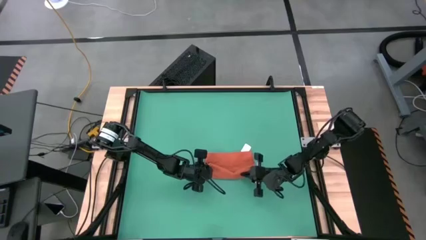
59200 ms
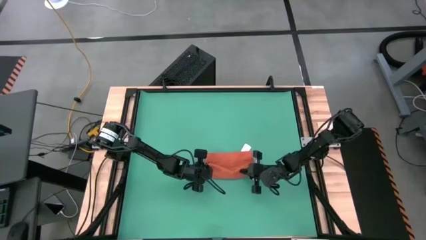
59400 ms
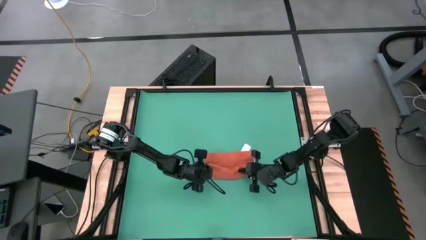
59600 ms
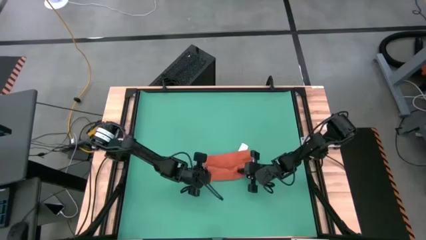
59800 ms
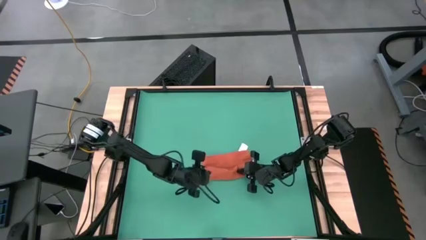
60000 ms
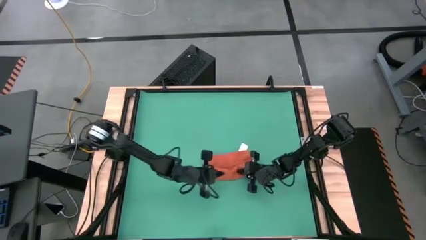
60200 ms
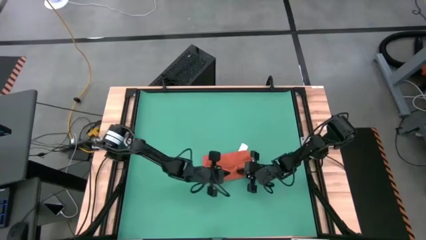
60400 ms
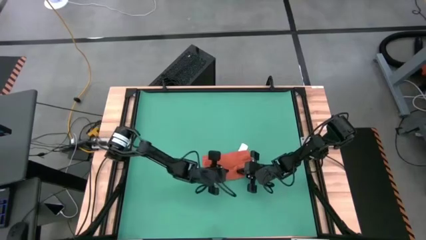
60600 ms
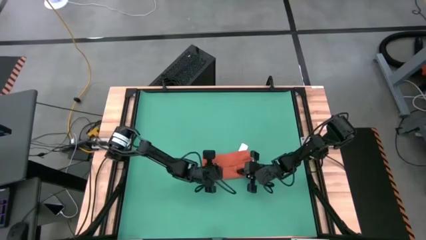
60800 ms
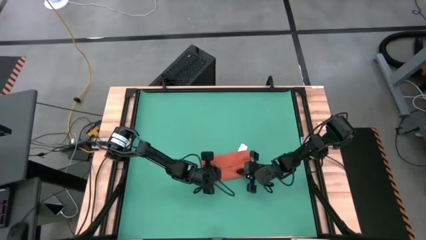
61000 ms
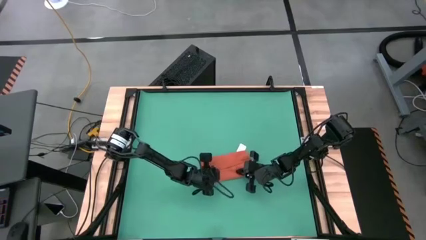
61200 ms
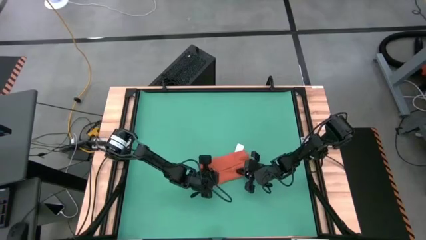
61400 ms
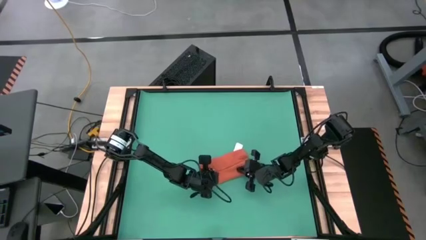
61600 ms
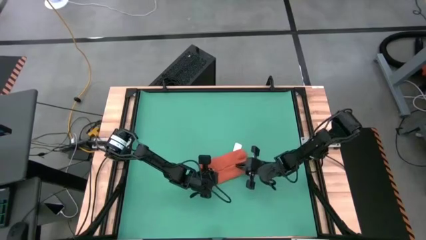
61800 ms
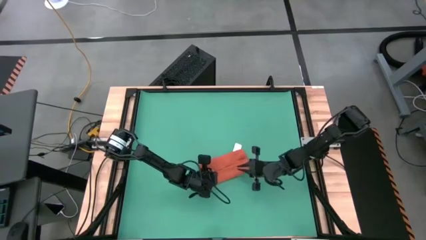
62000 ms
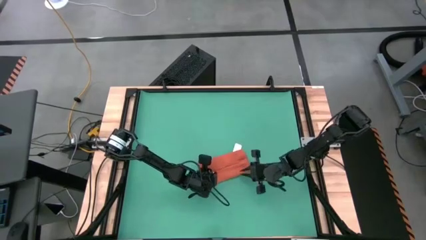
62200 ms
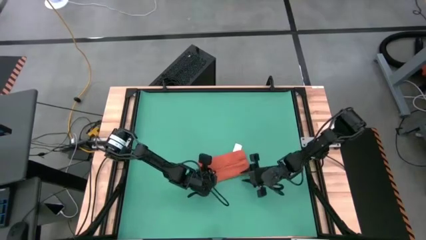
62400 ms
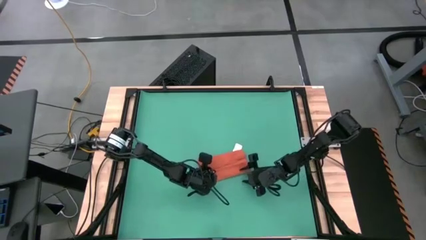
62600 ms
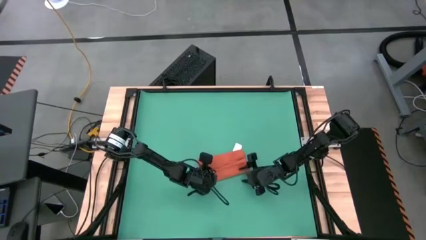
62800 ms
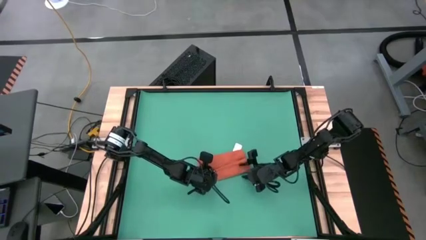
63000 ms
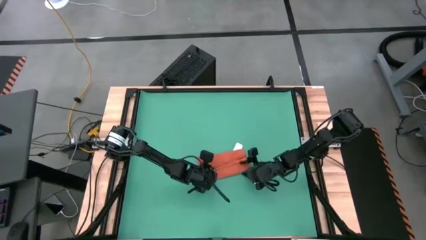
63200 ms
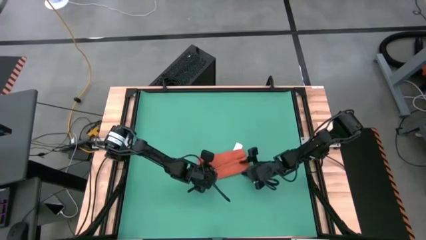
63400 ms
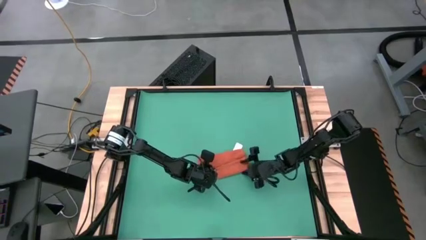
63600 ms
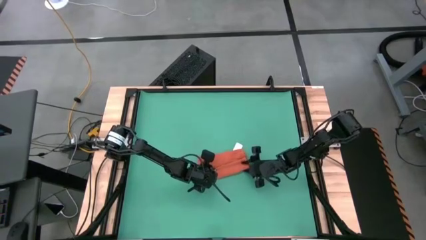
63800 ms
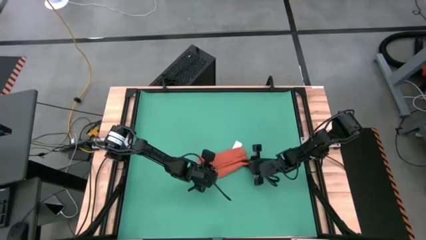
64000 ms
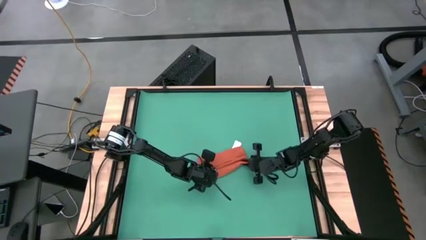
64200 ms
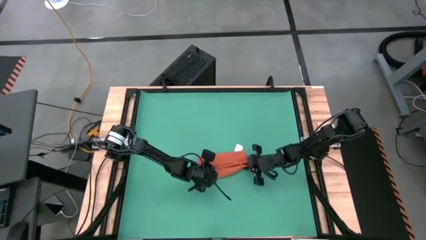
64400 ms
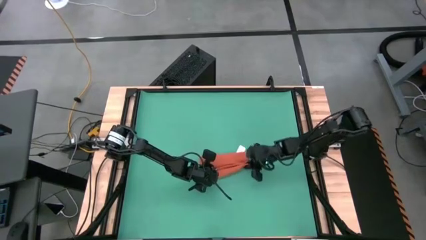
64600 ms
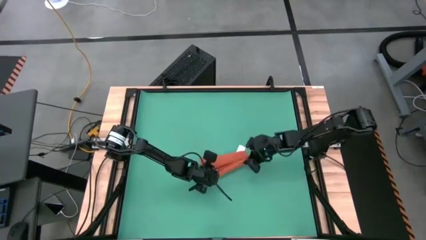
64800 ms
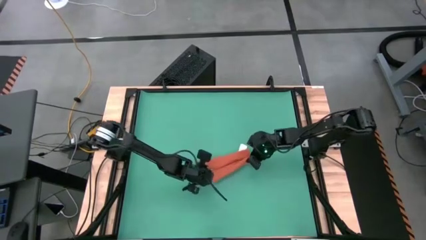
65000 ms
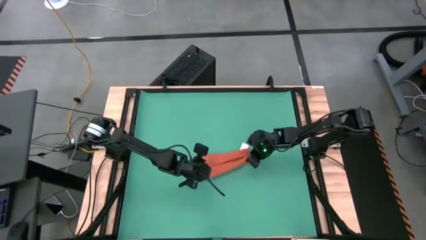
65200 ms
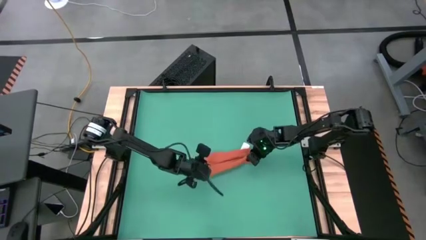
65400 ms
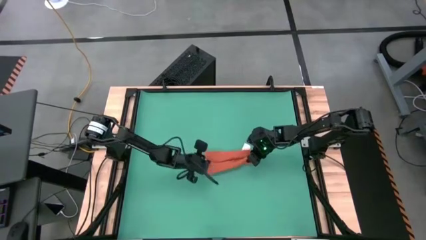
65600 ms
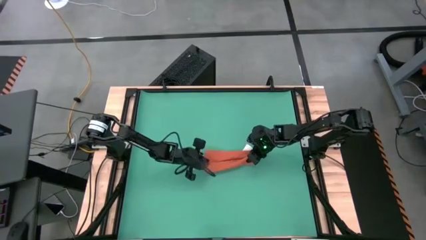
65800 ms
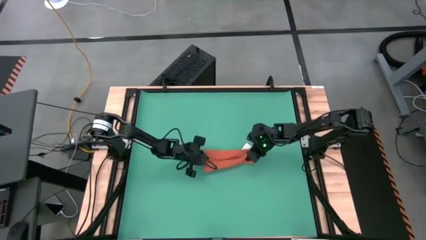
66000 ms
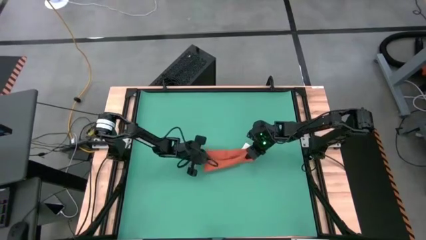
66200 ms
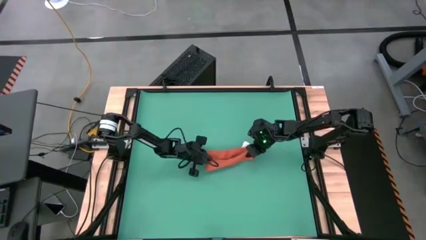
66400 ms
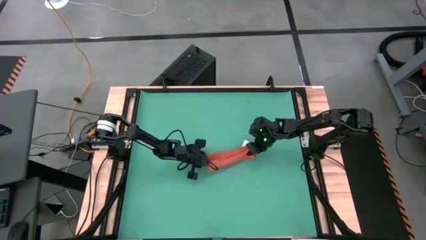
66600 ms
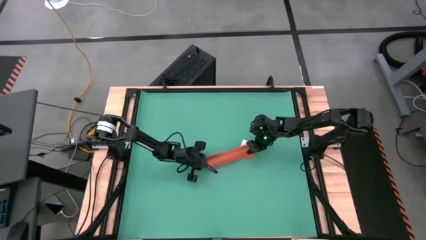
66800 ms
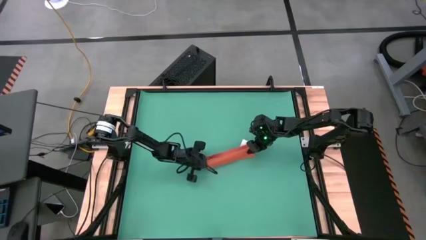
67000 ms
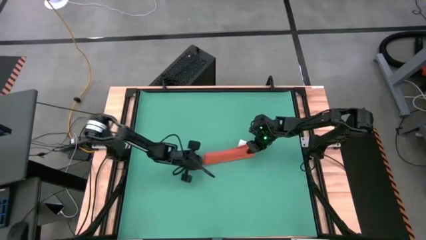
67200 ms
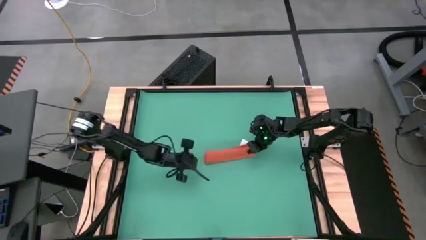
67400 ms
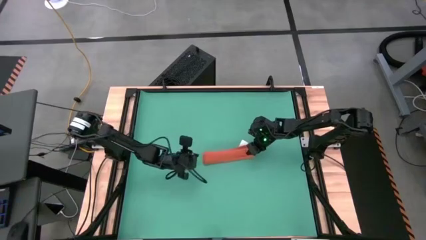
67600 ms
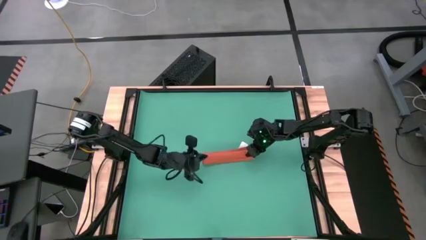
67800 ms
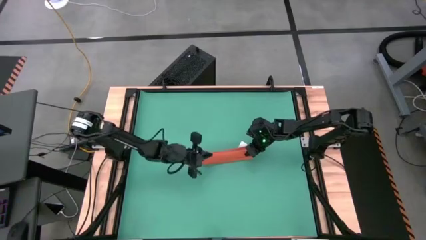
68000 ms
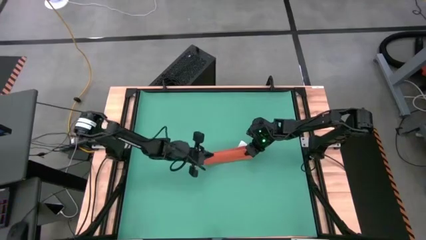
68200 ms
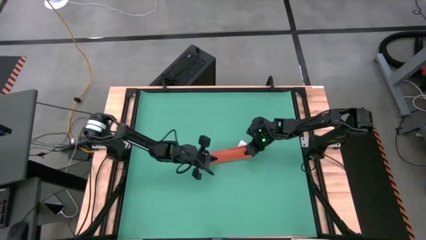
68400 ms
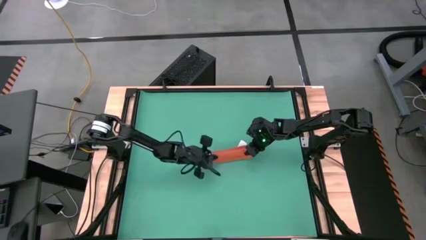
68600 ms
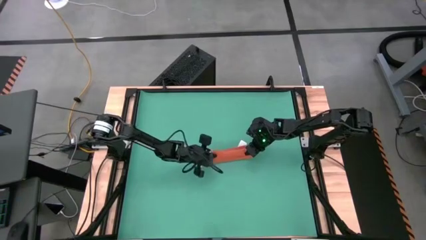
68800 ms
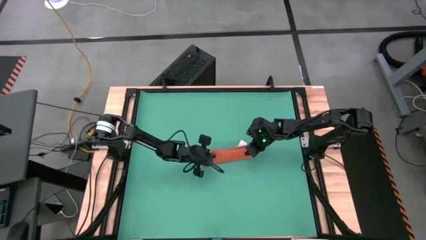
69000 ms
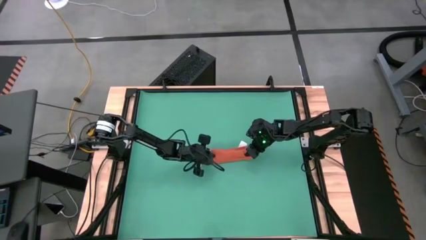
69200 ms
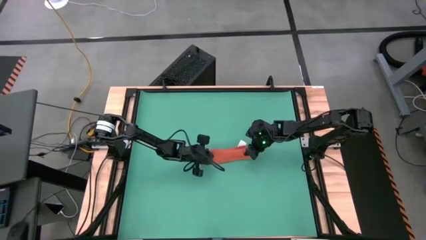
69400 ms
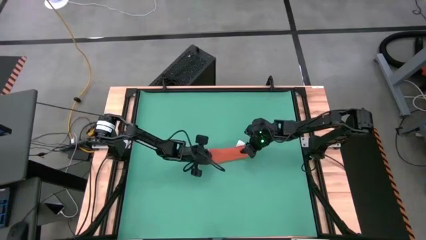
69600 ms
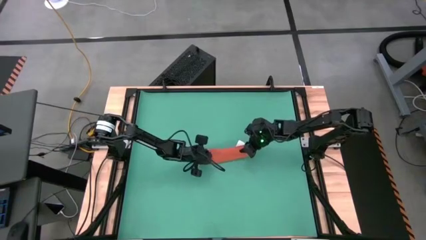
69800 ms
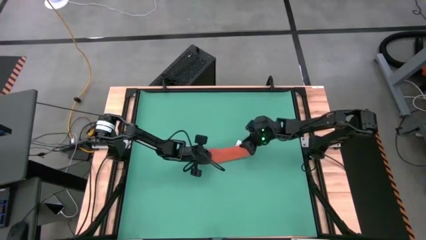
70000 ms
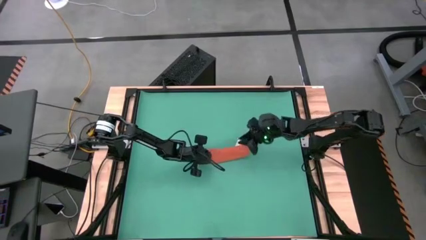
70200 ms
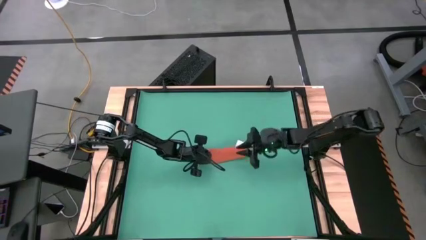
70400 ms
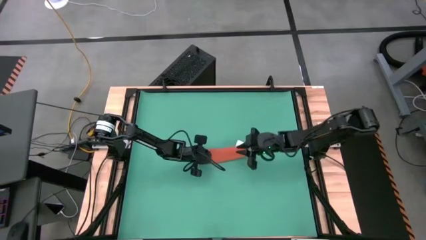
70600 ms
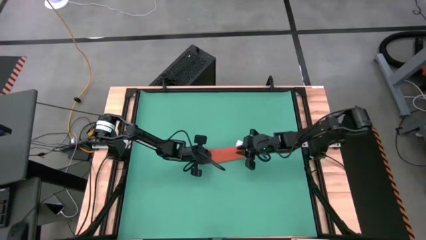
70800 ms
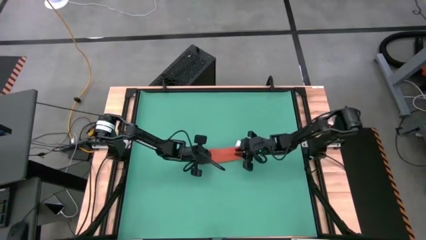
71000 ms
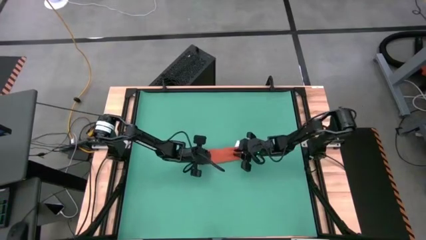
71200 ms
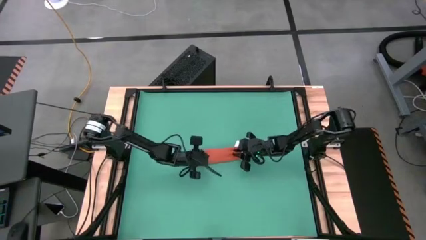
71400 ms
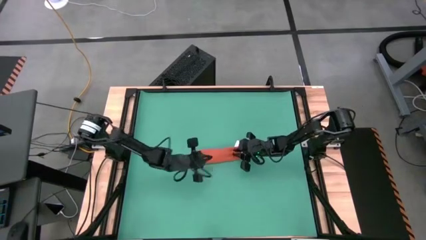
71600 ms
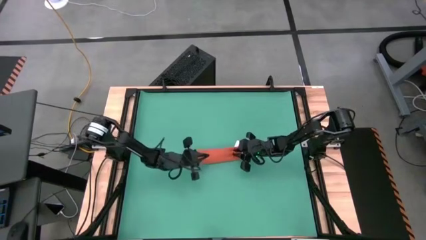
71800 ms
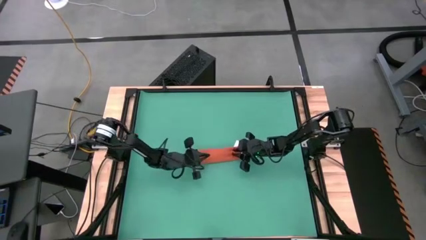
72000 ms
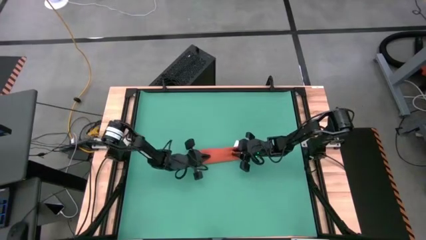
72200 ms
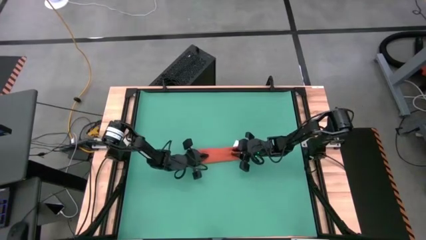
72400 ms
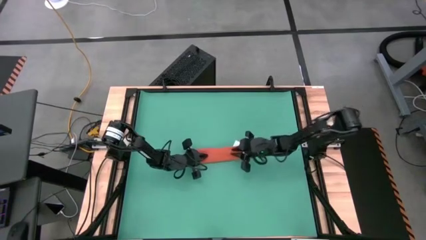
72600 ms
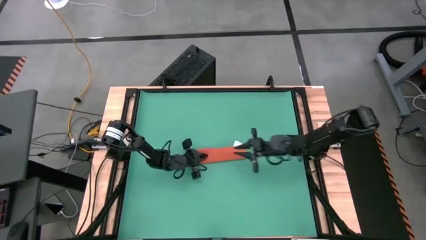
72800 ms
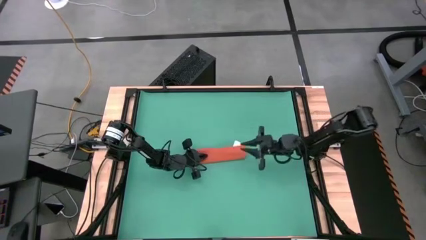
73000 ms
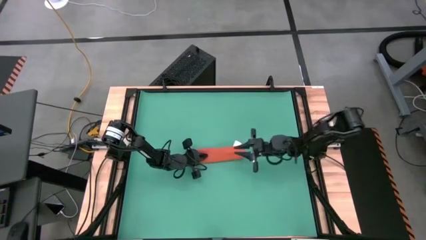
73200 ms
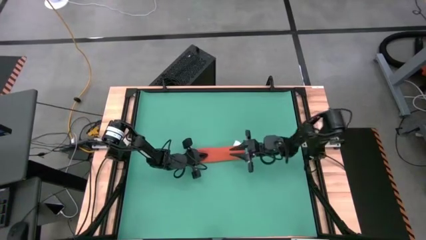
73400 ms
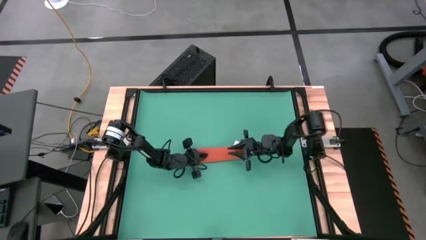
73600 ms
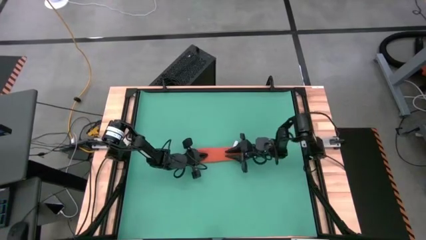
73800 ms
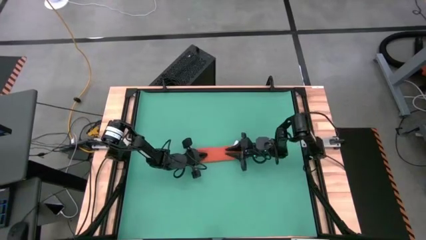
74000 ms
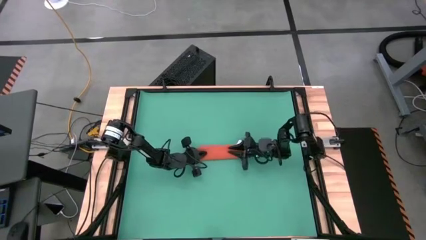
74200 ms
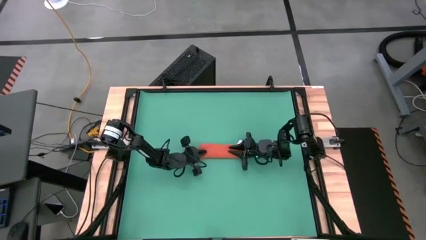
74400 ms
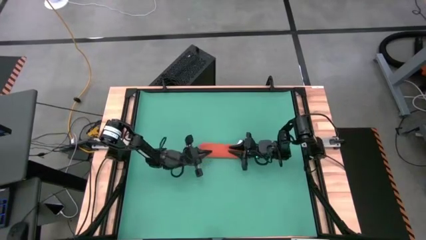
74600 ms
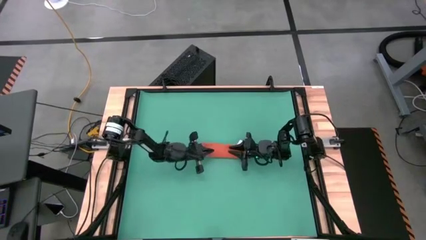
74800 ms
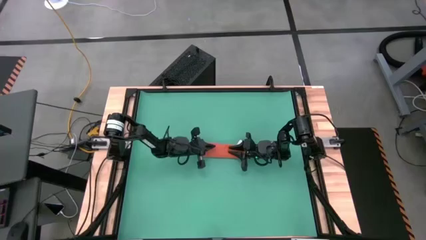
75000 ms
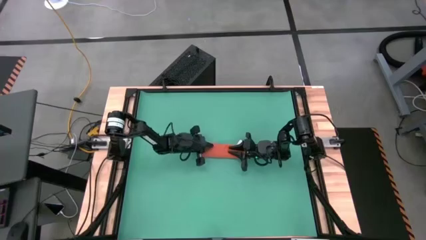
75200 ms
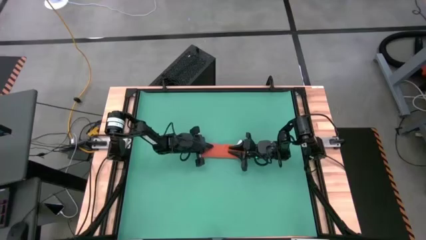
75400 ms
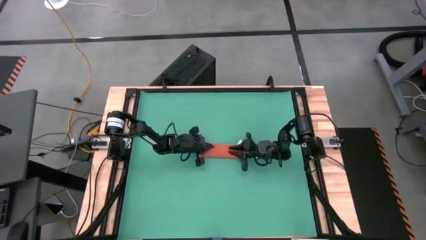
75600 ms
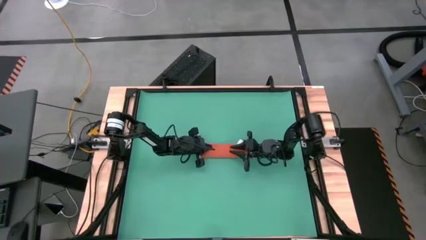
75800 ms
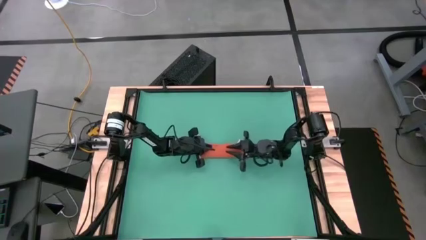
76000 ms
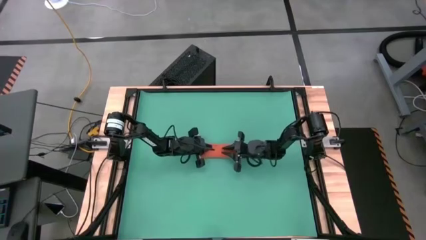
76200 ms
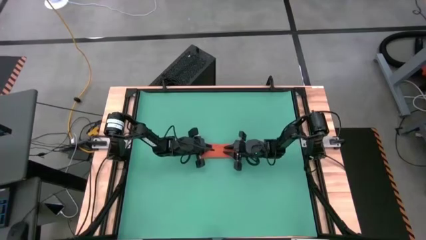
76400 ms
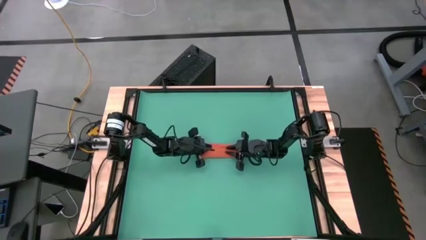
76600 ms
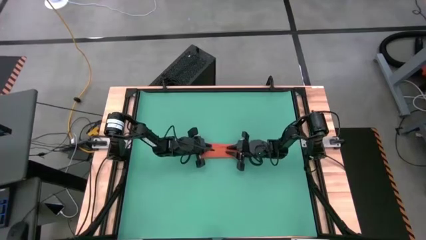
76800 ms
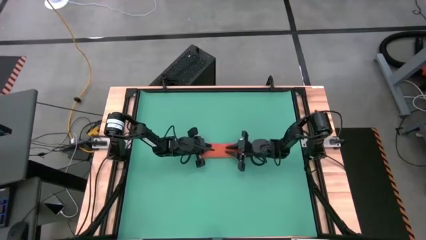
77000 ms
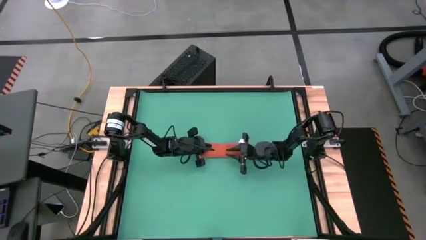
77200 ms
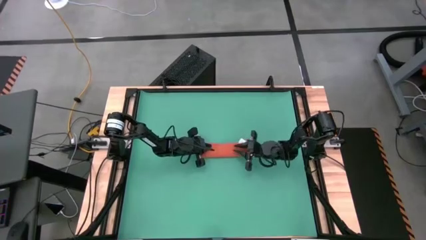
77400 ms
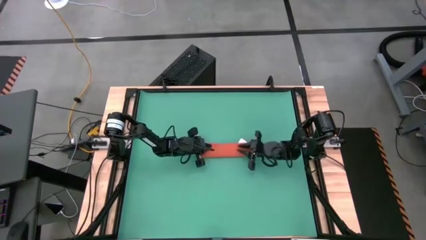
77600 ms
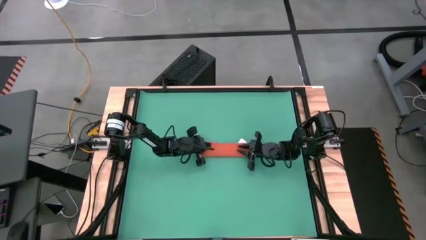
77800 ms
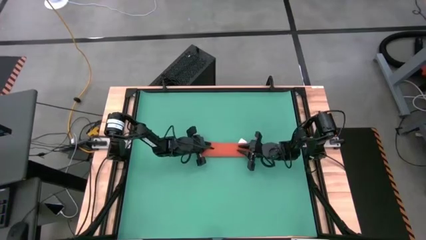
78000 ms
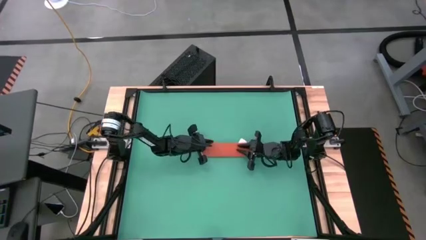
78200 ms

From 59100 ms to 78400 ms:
Task: Roll towel
Roll the orange towel
